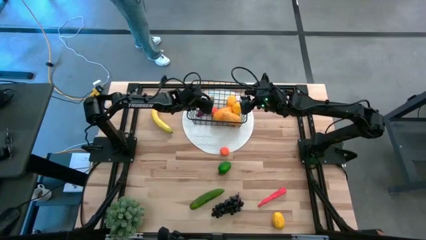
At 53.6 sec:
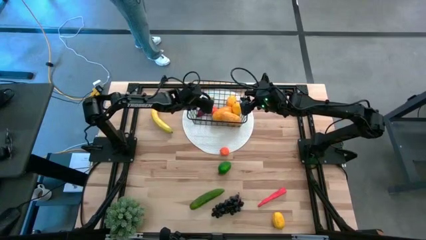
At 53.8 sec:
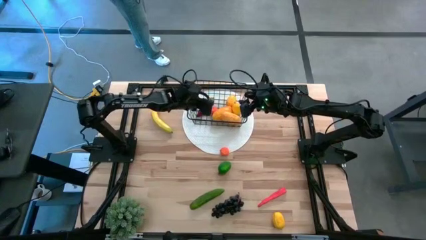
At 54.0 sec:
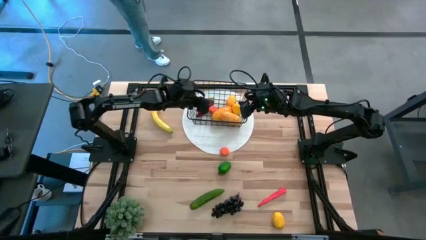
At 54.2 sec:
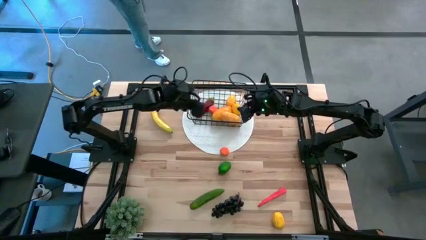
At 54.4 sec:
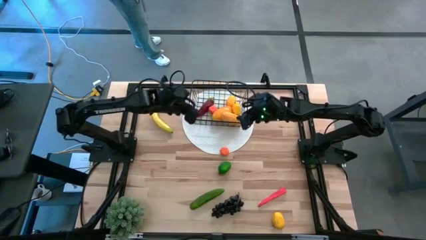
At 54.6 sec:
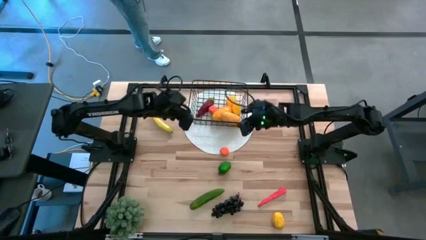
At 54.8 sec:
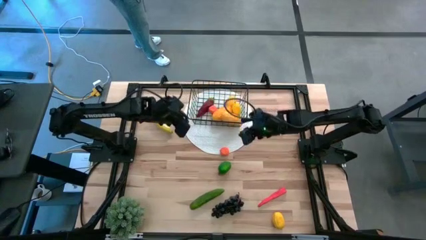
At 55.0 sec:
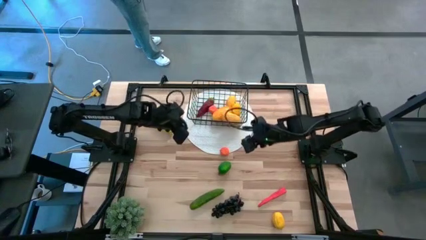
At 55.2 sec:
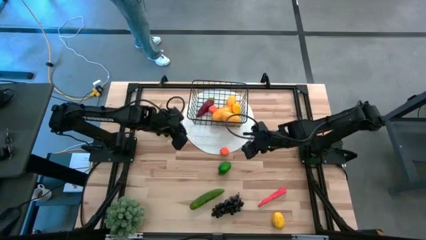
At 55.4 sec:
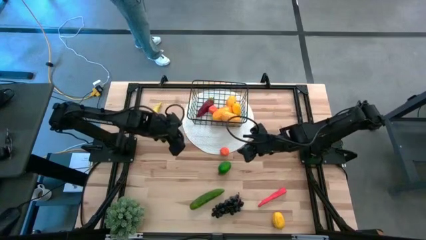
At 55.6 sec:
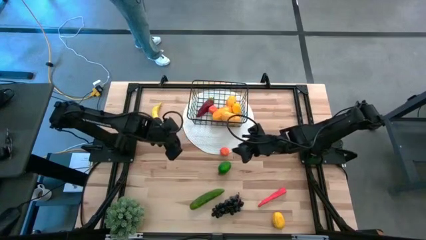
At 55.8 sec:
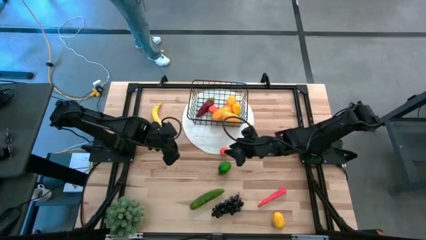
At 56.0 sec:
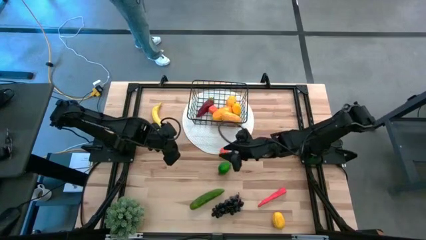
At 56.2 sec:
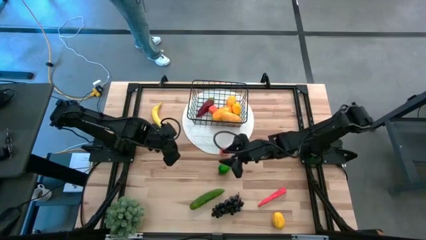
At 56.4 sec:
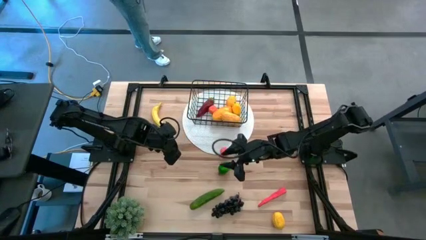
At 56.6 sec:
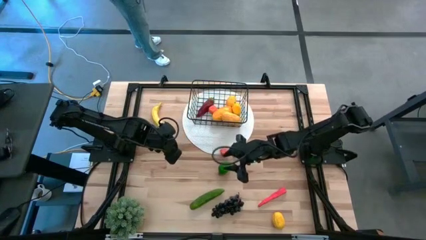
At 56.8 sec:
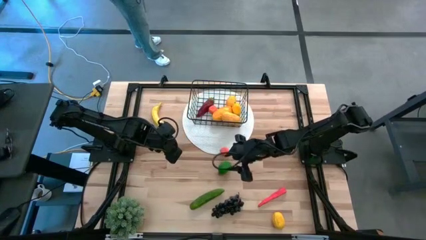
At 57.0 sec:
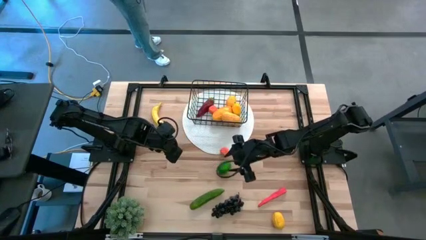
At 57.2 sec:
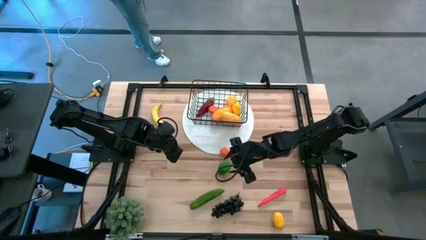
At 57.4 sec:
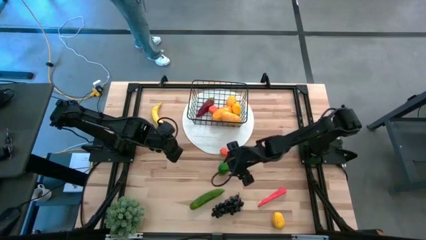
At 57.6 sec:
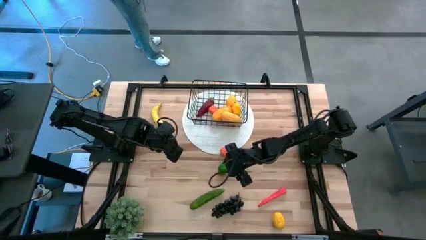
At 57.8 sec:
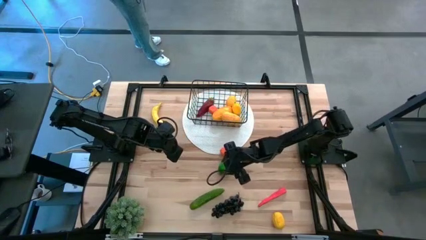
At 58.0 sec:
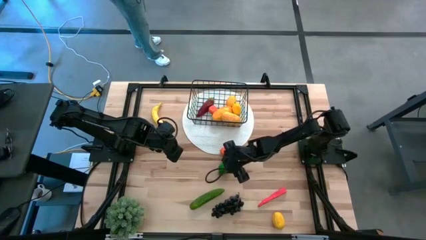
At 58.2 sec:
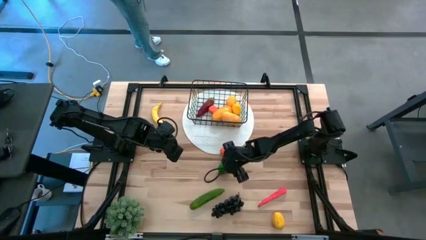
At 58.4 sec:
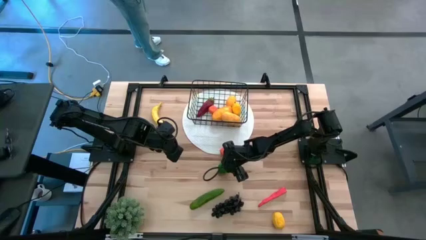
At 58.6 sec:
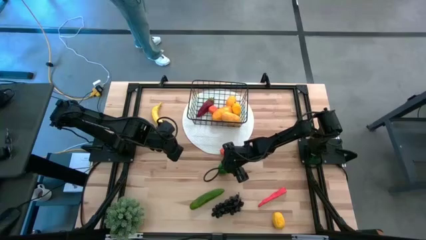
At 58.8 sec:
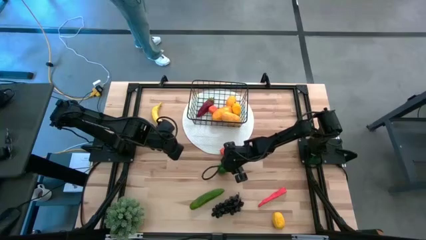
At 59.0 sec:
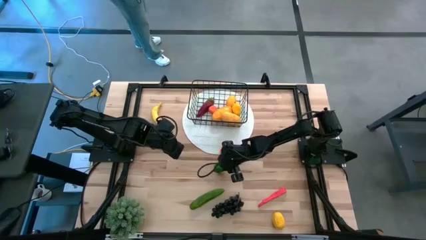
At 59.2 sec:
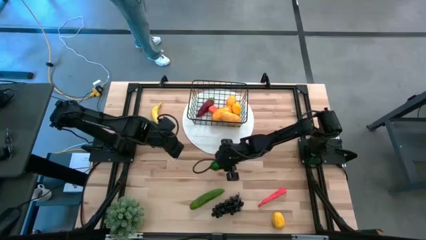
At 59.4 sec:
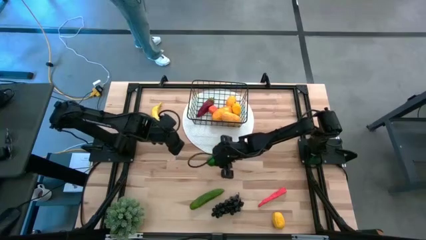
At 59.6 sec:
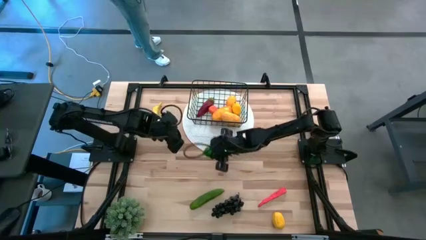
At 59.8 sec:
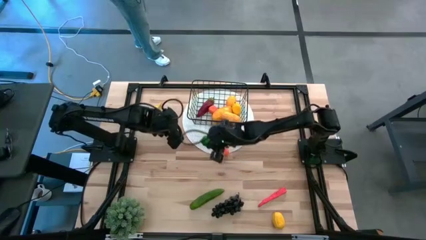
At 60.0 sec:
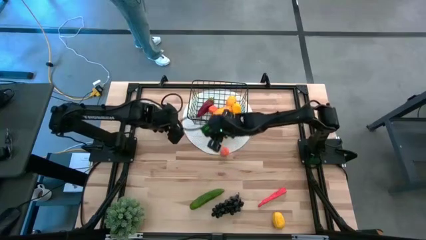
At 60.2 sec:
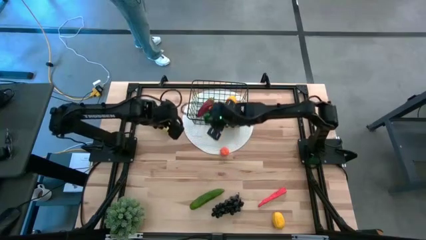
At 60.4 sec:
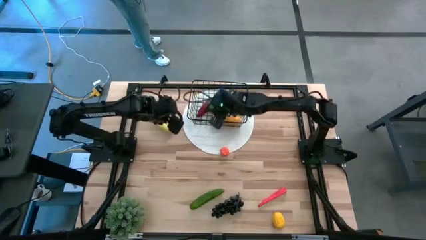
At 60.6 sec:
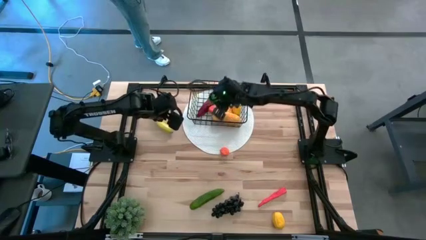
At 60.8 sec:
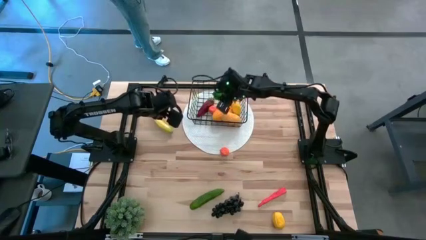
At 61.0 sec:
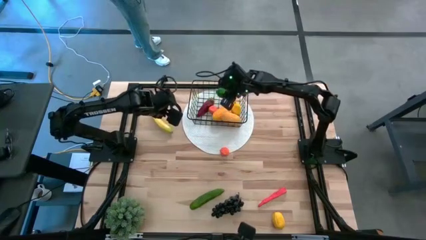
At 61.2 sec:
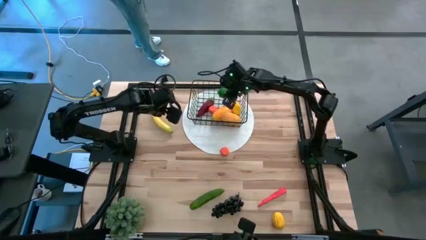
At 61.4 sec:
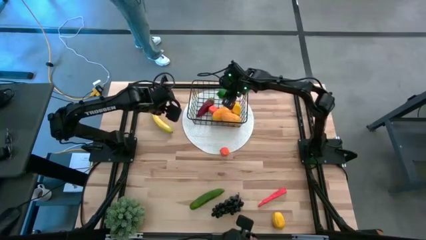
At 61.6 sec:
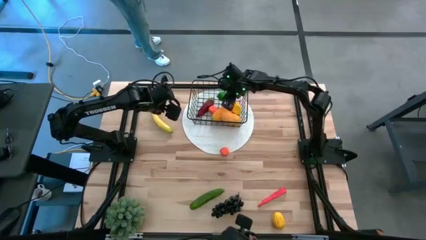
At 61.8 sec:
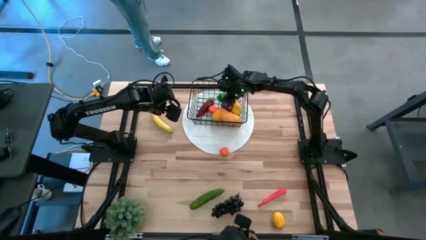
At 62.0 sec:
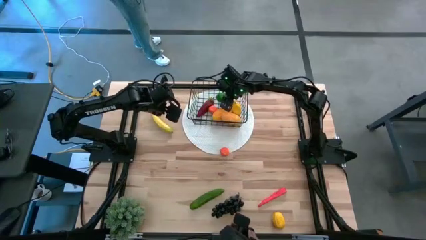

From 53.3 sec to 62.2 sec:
Task: Build produce basket
Put the lime into the wire basket

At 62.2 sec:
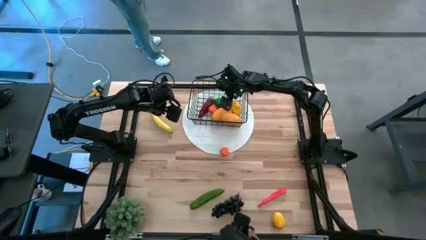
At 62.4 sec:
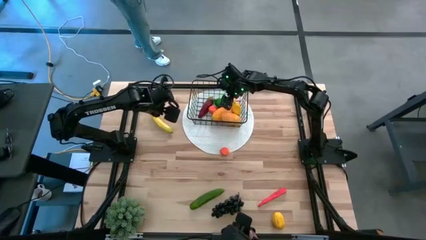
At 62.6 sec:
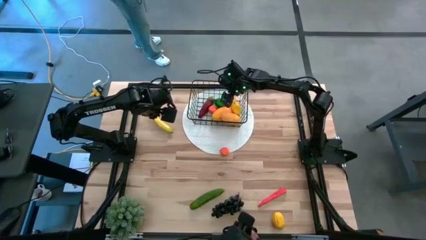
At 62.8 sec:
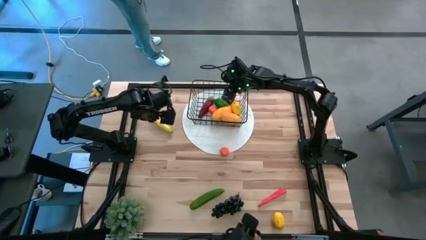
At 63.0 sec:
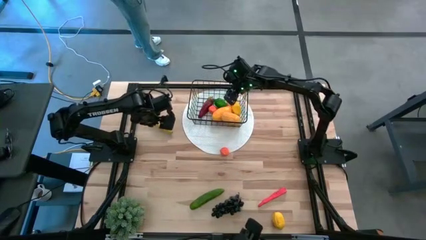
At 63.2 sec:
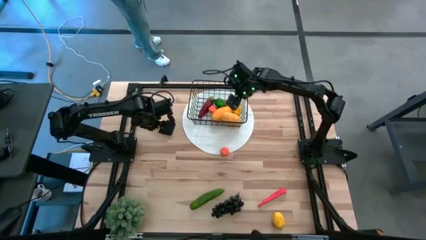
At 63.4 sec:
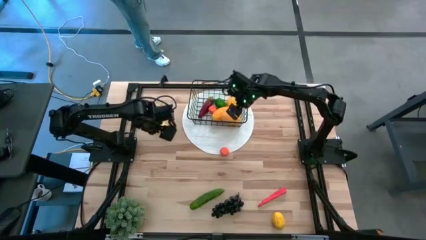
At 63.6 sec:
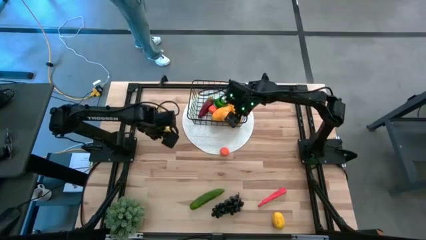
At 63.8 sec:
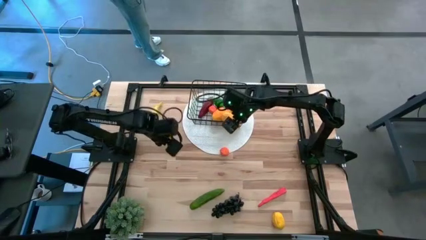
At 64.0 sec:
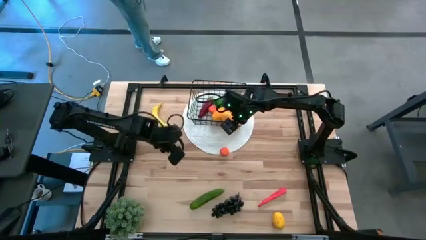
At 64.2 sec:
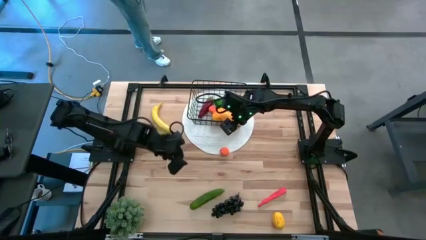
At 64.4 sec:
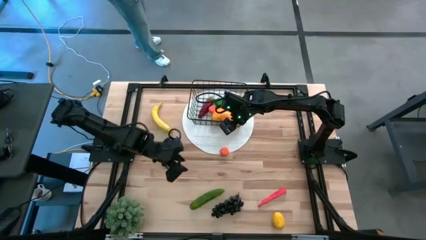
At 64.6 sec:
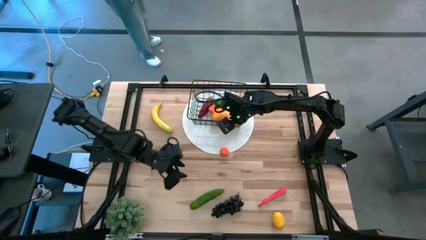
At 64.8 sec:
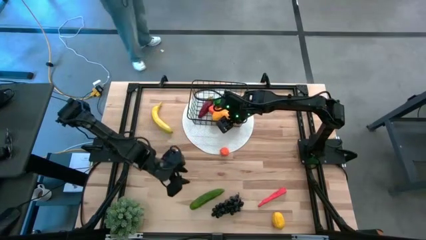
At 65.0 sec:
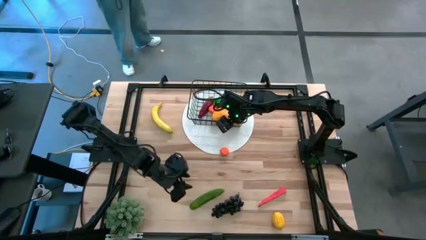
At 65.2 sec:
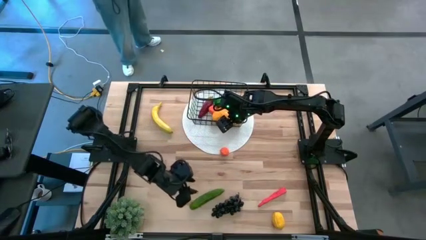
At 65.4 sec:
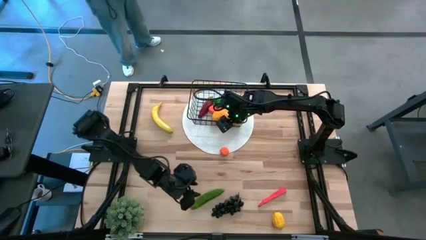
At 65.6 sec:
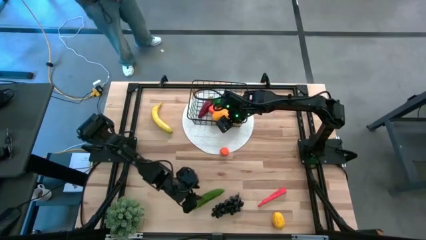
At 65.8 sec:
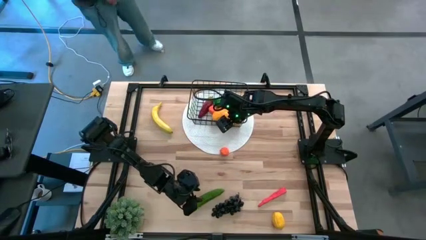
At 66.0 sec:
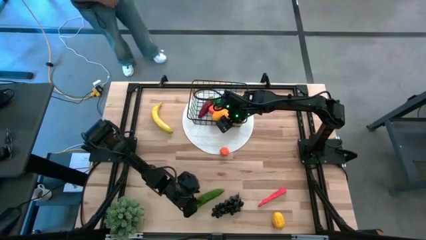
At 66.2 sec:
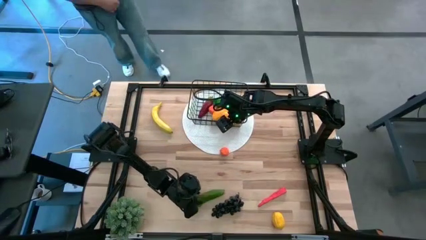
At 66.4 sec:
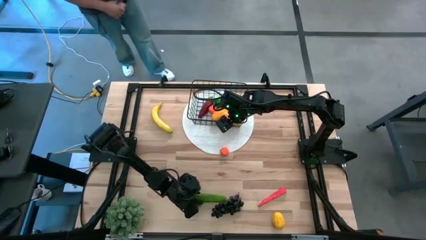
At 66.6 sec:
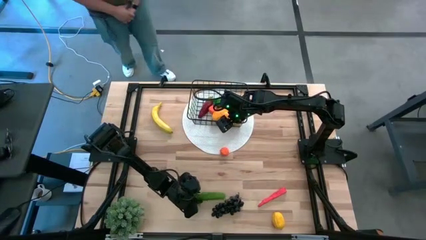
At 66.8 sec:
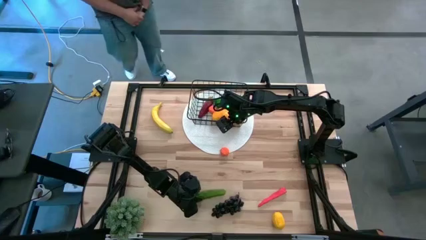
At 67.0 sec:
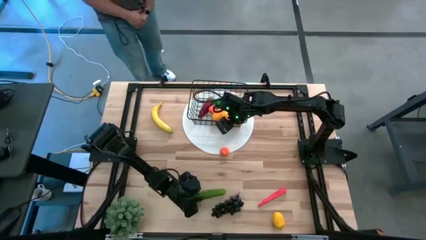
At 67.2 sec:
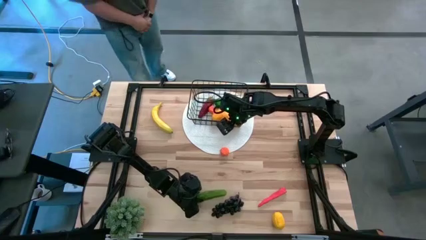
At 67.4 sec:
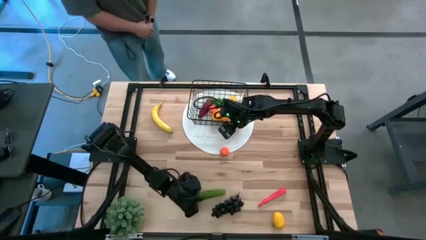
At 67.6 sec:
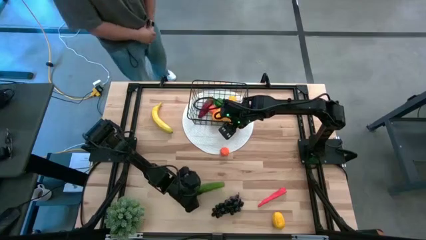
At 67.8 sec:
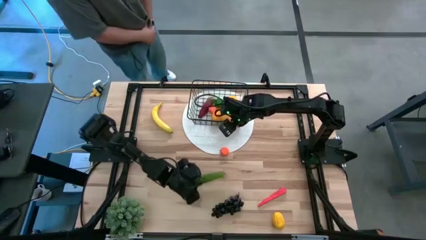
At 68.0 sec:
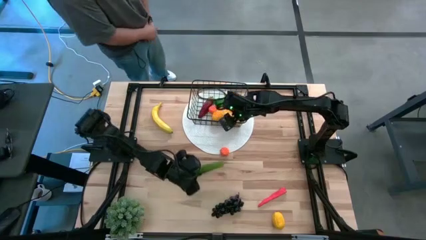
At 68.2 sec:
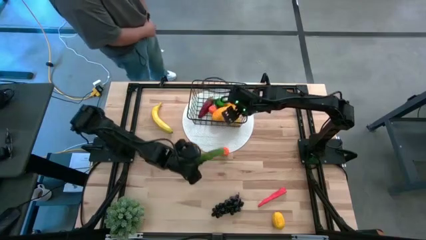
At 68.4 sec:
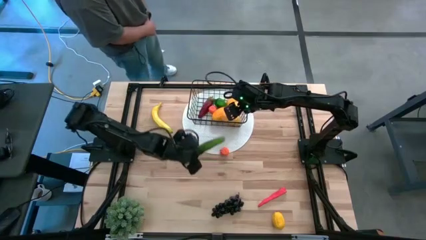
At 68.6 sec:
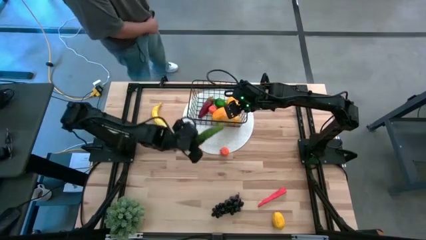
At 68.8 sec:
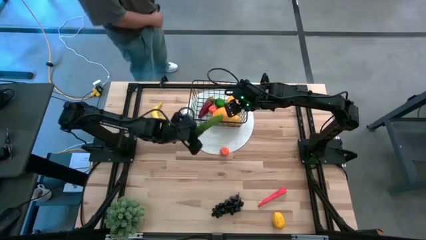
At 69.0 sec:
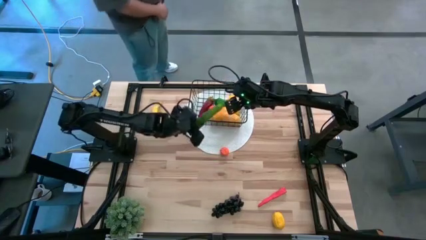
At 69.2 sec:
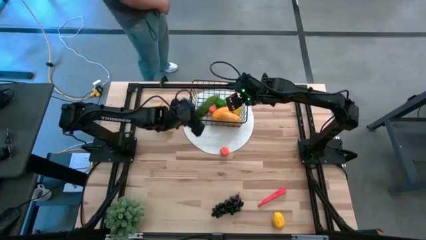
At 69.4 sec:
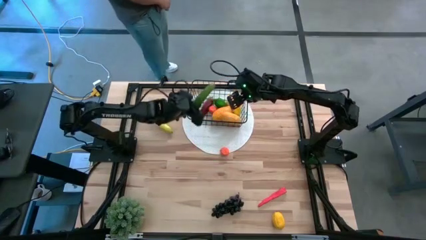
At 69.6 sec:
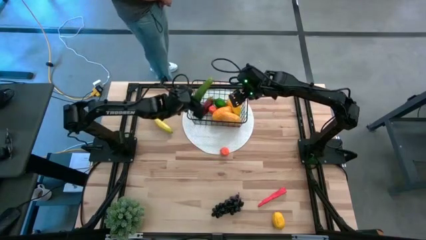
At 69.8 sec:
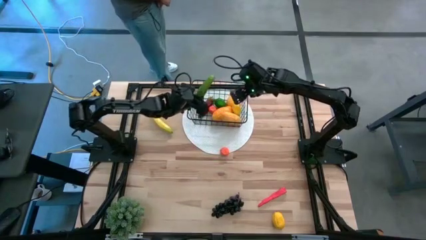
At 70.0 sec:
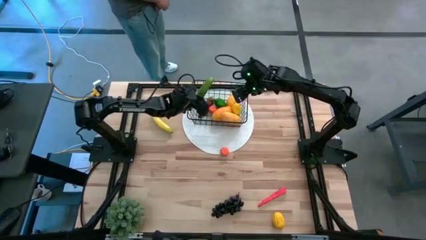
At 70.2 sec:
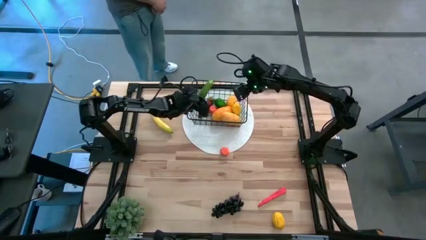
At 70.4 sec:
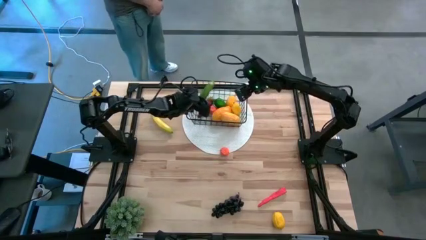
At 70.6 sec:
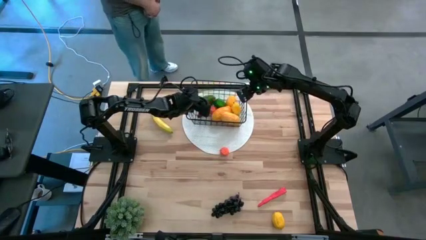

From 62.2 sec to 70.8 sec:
Put the cucumber into the wire basket
